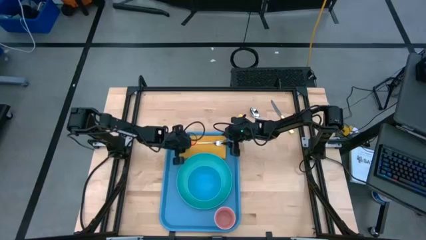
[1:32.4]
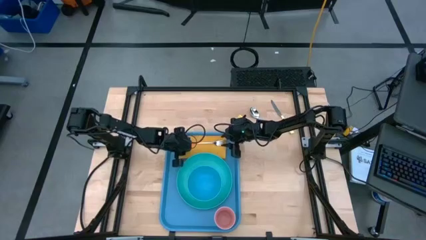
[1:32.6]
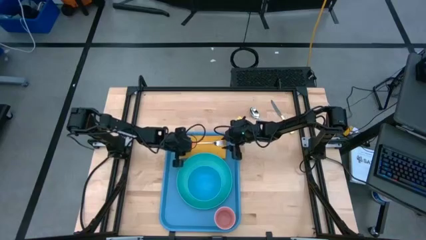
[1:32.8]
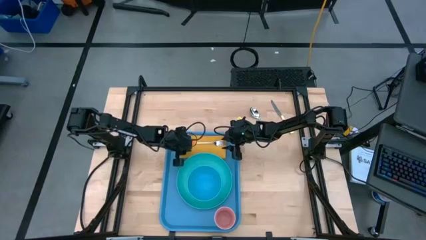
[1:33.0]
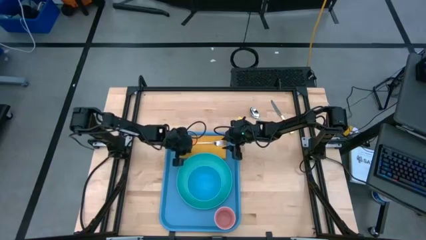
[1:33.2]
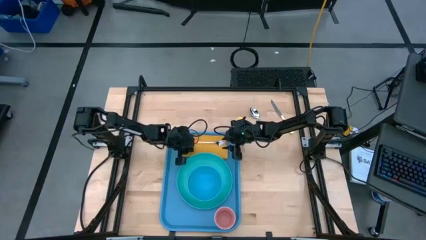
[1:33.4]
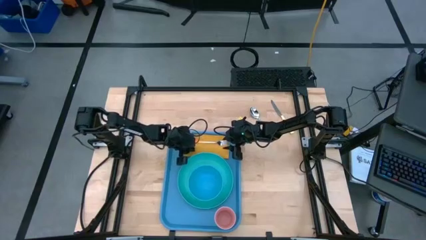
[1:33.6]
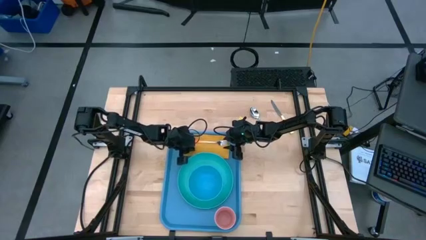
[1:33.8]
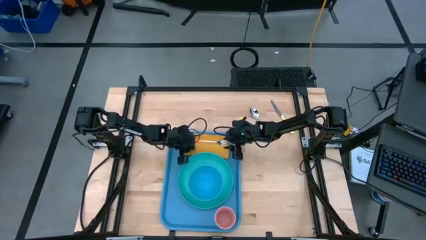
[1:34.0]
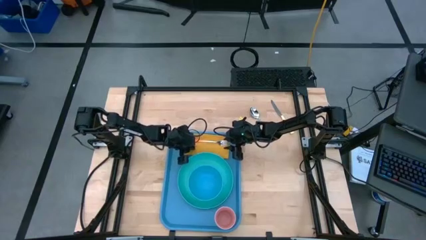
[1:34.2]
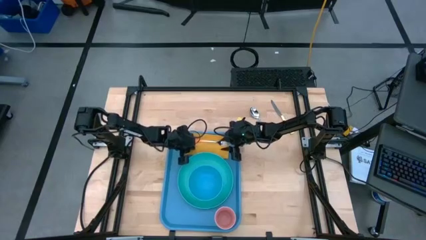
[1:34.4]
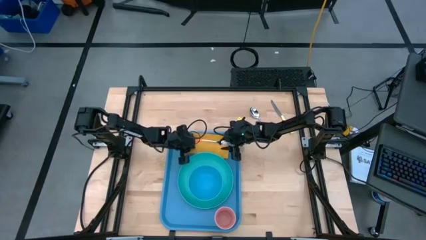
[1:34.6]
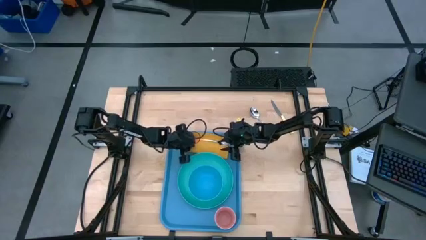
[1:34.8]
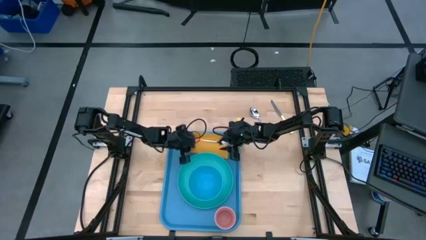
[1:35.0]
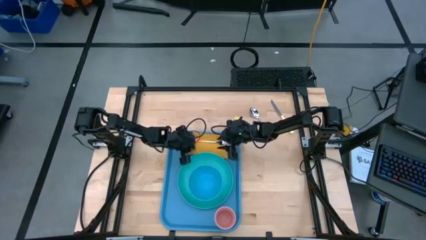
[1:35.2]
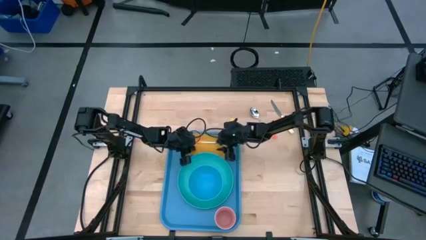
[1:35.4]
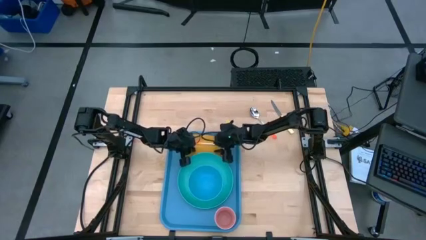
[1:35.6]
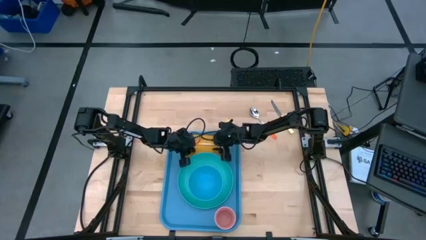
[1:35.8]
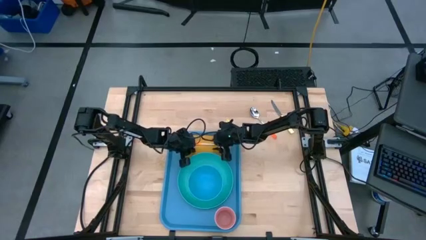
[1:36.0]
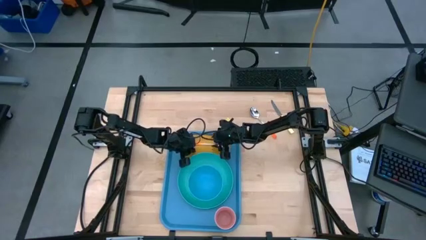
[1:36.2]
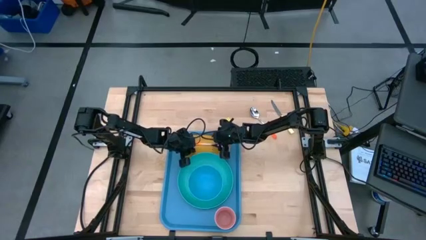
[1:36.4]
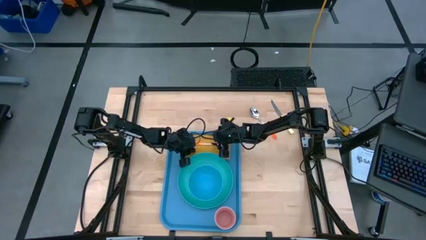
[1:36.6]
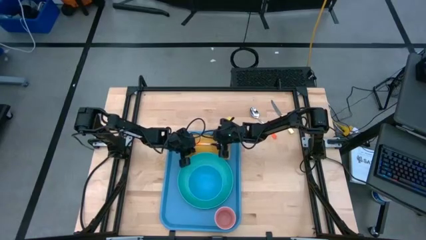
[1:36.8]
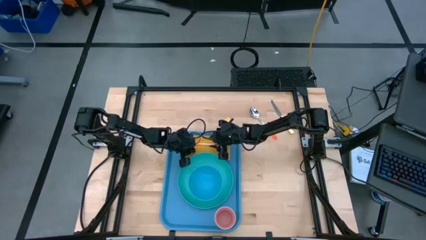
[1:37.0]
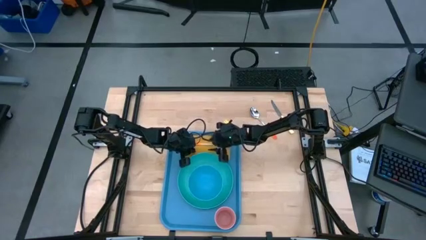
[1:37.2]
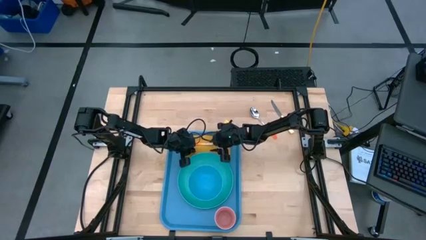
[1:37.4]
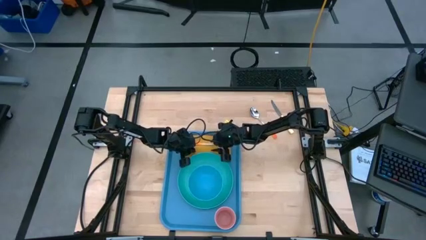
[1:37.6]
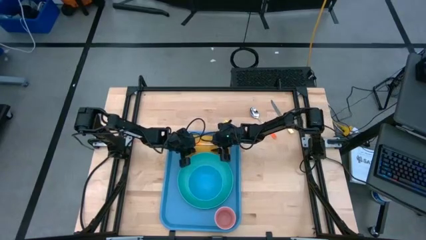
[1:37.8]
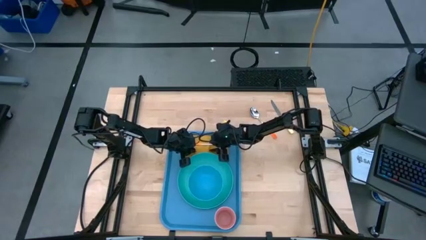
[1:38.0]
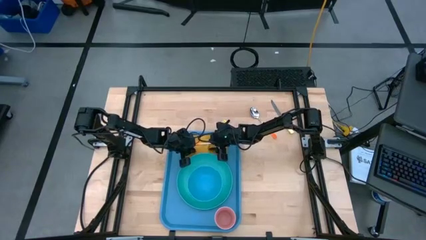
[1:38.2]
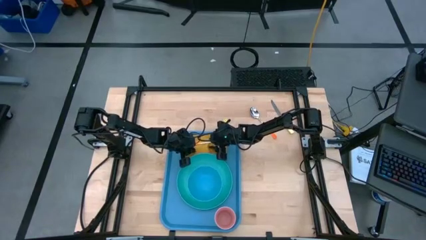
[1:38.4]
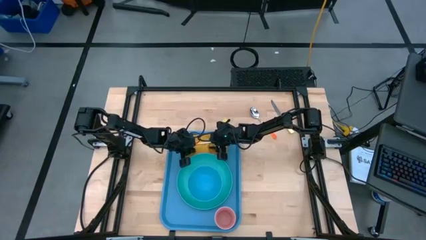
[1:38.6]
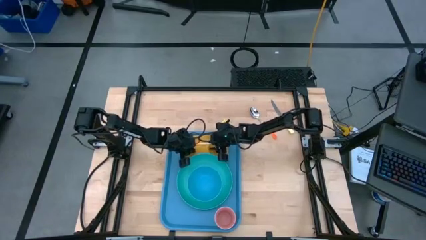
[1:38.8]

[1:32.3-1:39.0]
Task: Set up tray
Adjust the orange napkin

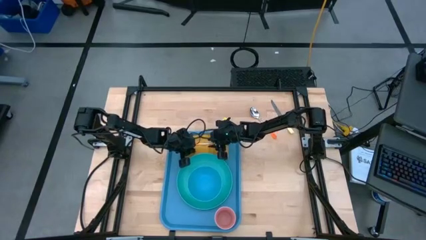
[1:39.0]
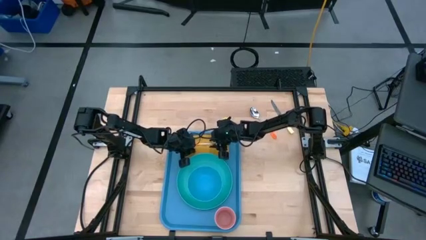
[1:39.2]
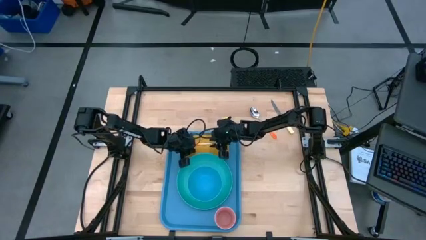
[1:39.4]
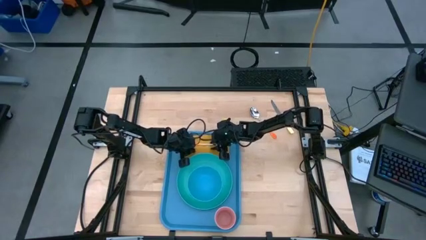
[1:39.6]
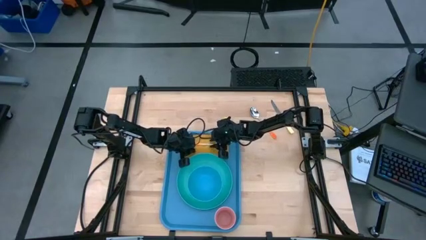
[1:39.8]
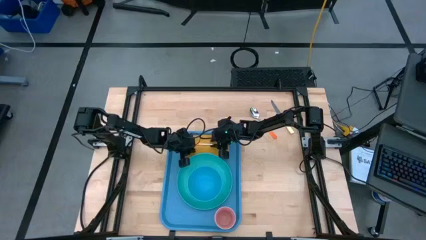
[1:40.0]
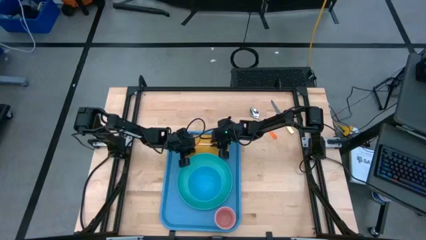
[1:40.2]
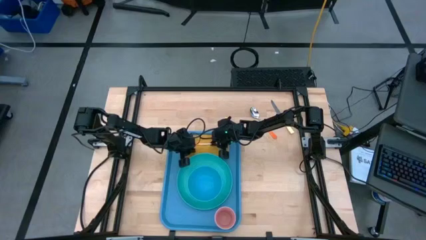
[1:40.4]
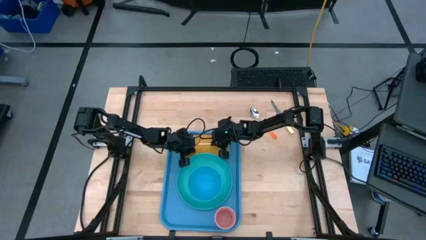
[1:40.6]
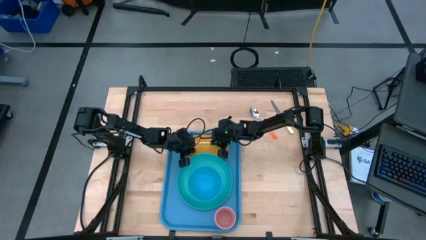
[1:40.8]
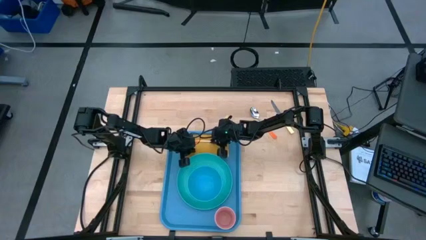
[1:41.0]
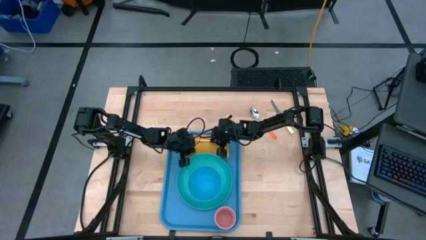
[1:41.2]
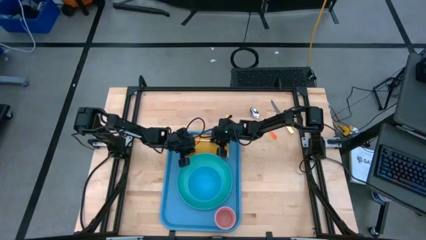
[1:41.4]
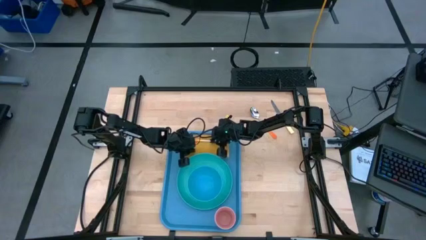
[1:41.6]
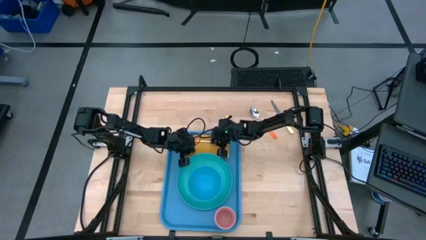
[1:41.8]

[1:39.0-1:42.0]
Adjust the orange fork on the orange napkin

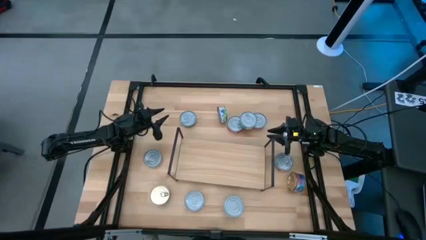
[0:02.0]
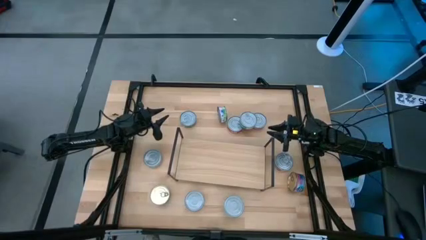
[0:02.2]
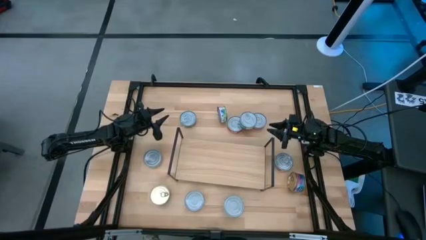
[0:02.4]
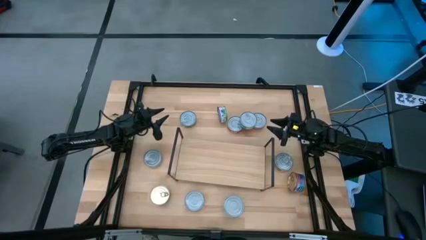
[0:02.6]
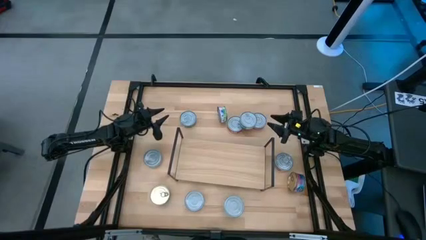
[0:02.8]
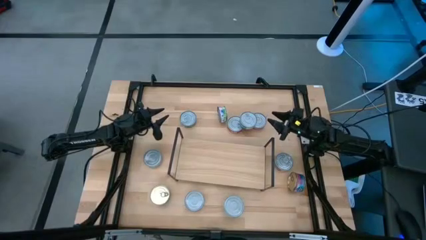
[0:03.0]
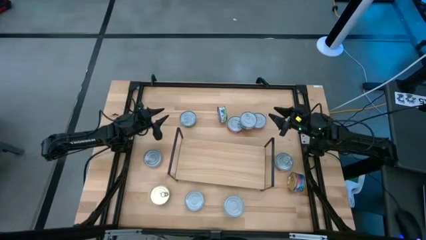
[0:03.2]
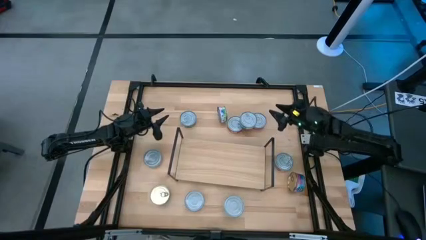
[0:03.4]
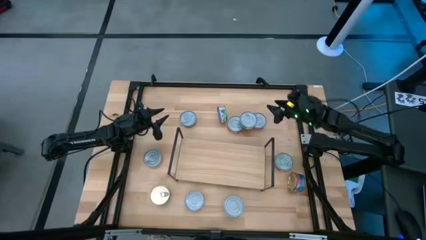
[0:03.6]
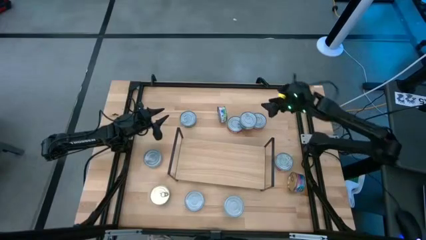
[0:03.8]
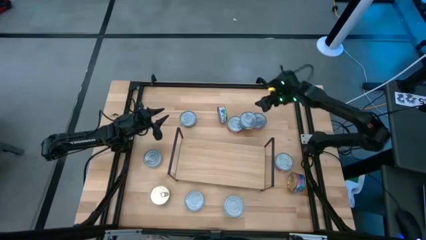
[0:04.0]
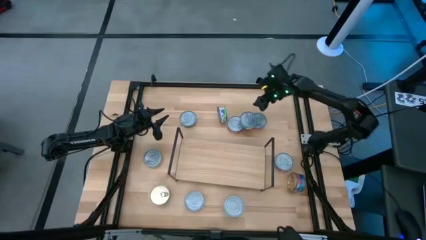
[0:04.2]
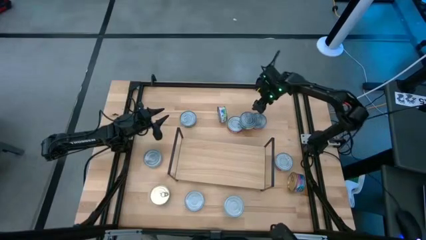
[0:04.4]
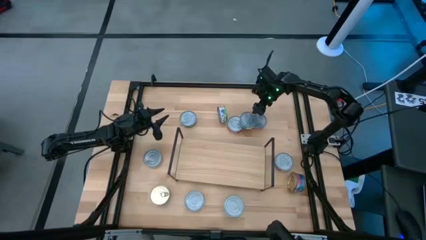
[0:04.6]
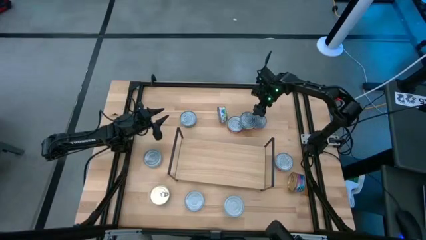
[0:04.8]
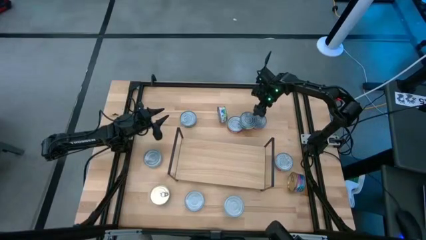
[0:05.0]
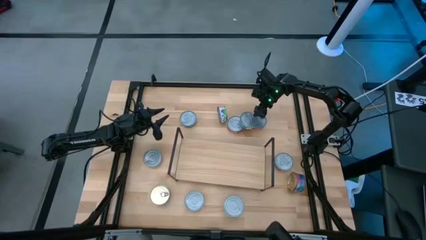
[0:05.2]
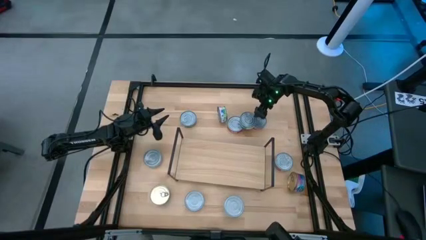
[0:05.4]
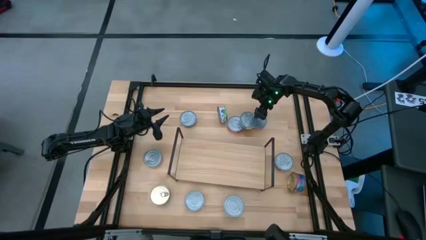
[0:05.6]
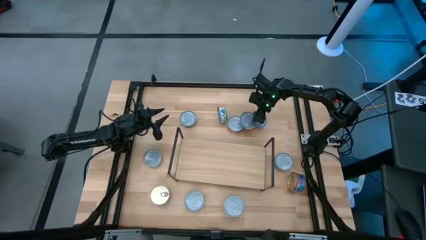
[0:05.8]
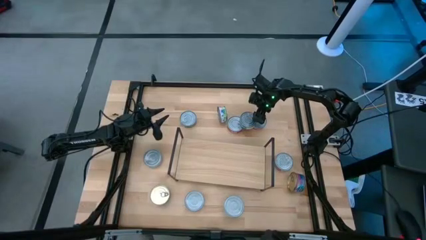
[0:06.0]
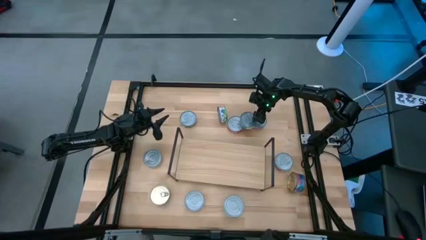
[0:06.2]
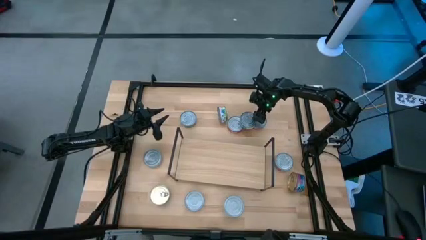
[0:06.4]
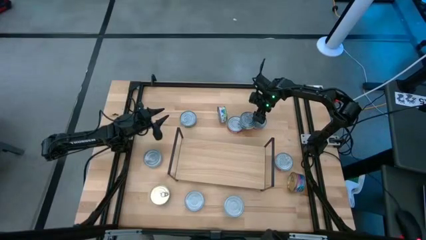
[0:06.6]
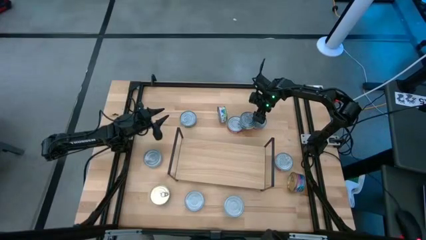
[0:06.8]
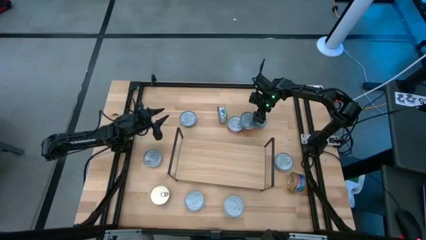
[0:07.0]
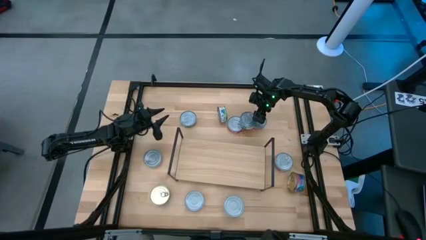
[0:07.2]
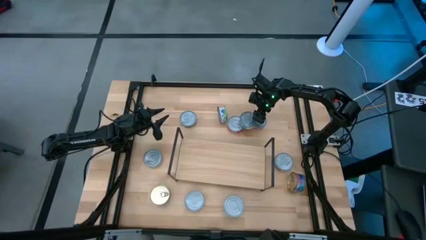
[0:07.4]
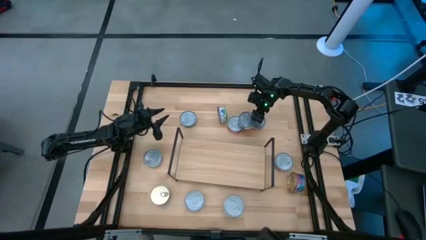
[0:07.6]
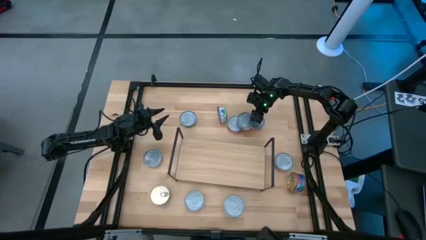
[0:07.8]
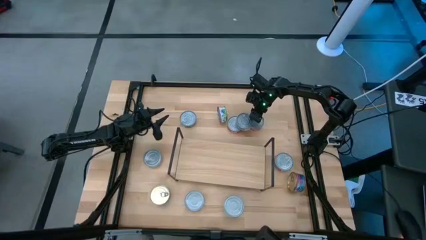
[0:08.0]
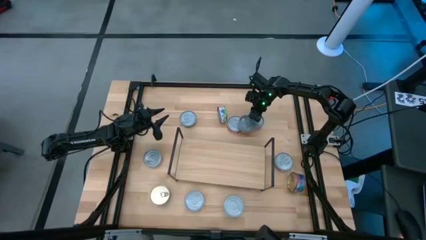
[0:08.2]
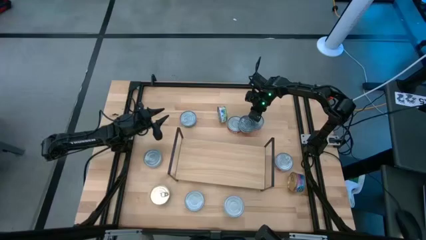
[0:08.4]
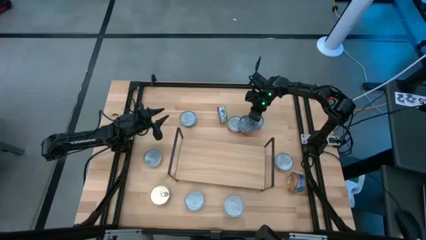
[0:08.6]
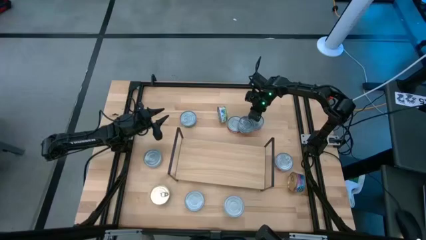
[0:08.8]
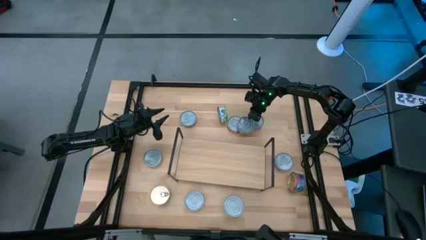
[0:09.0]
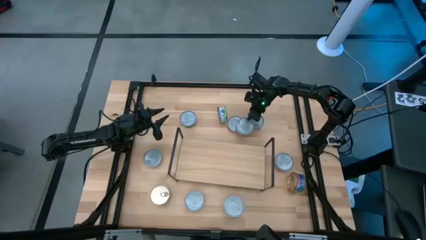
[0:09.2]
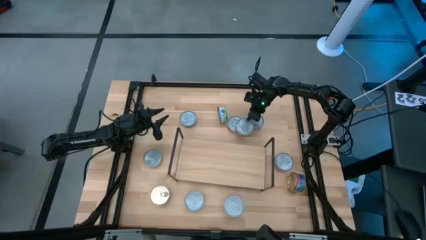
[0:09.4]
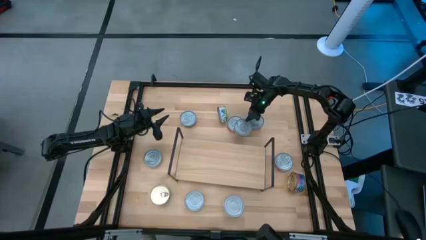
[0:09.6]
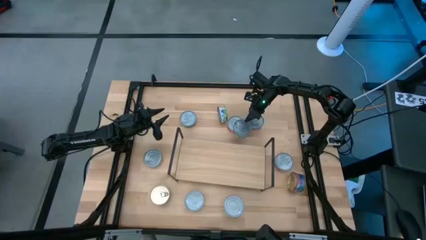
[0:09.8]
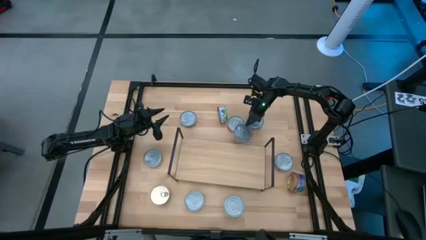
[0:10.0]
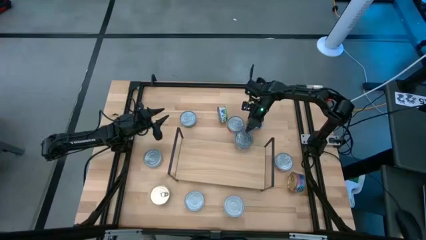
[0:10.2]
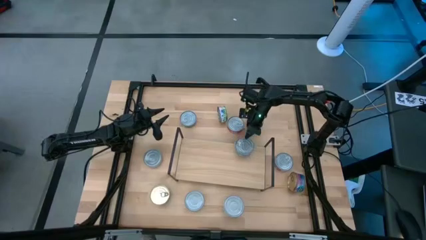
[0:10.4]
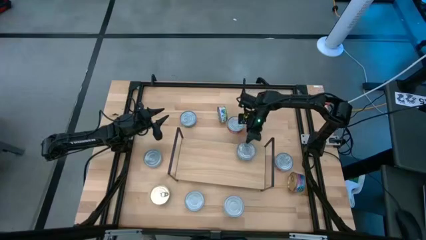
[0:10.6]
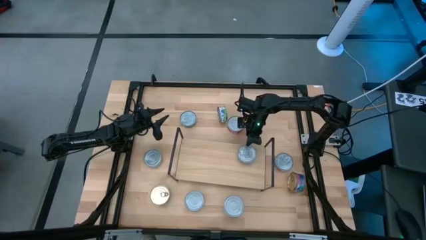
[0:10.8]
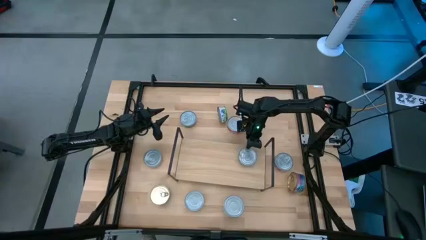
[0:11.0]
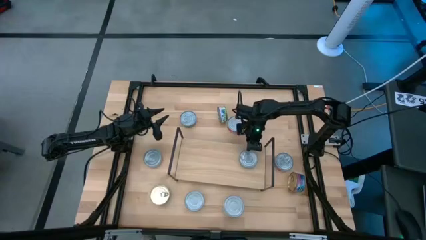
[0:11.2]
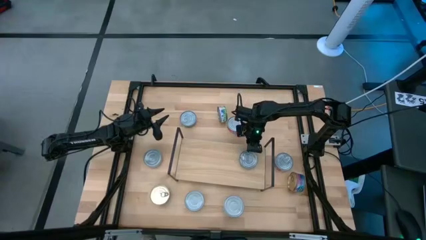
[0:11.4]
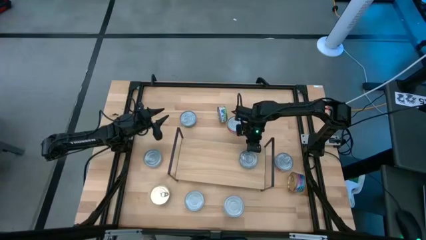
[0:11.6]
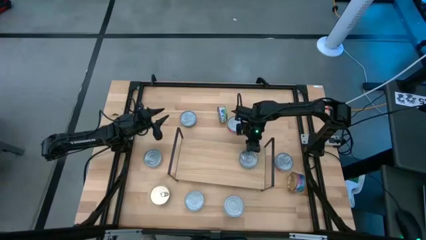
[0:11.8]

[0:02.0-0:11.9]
Task: Stack canned seafood by type on shelf
Put the green tuna can on the shelf
